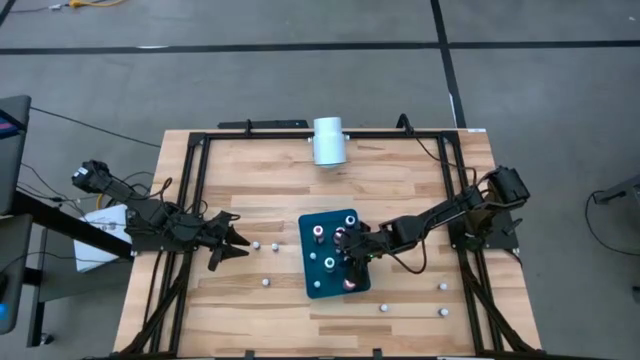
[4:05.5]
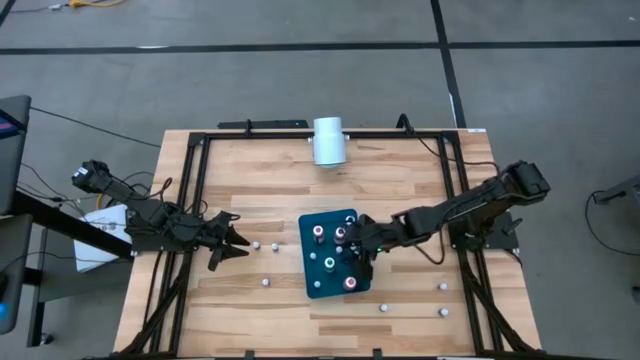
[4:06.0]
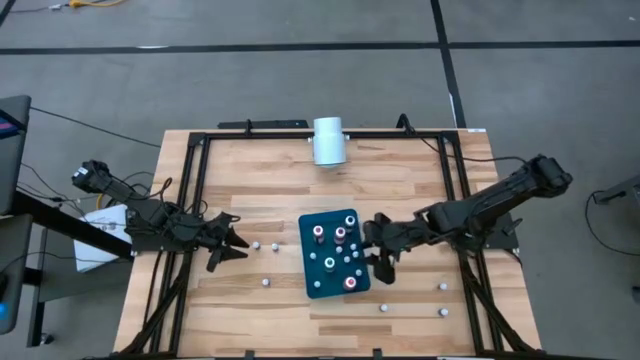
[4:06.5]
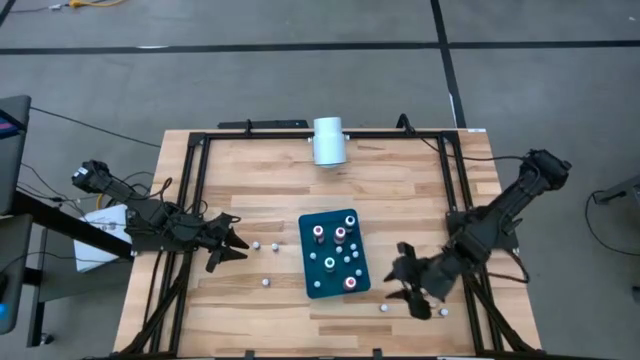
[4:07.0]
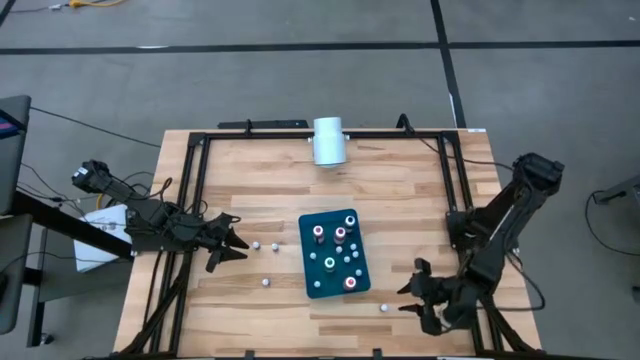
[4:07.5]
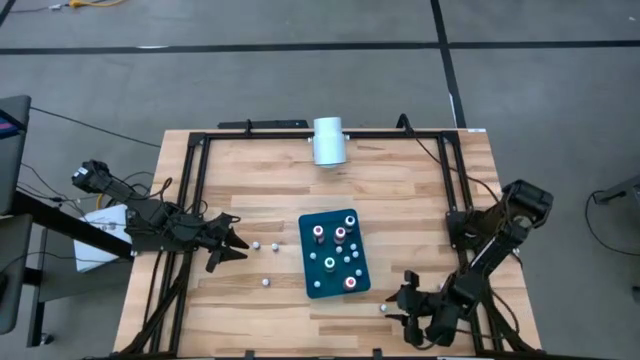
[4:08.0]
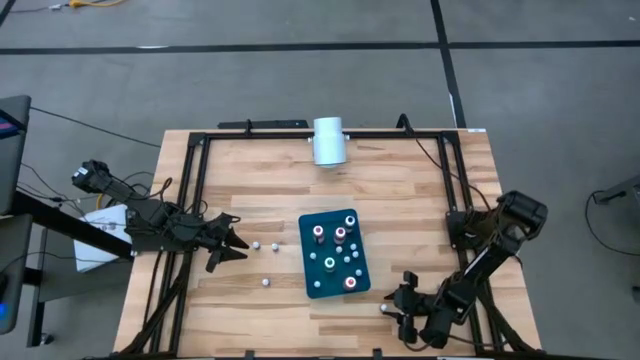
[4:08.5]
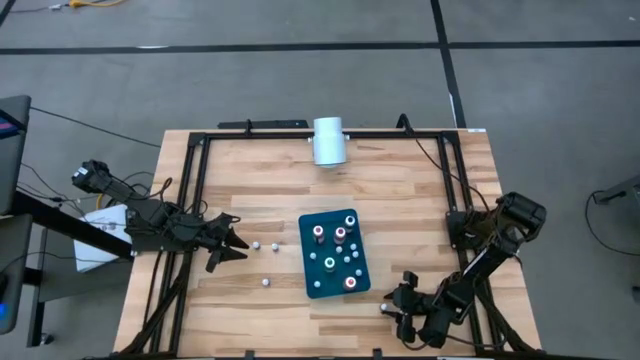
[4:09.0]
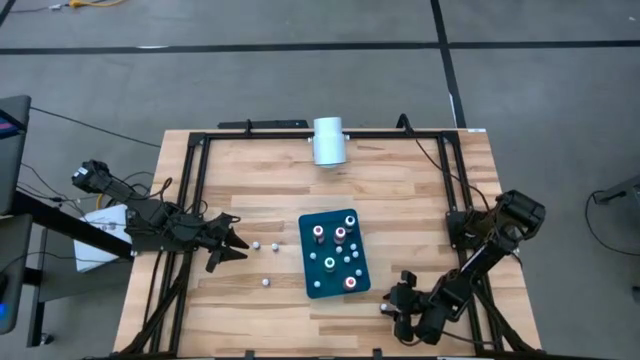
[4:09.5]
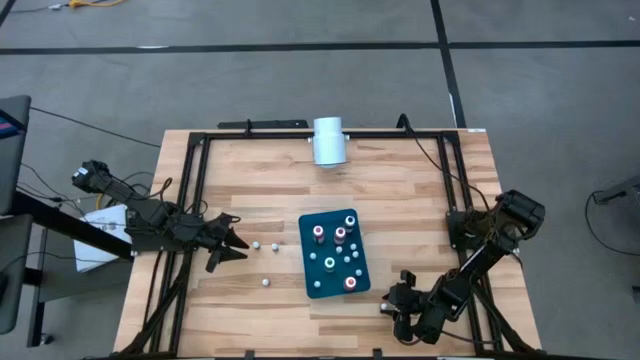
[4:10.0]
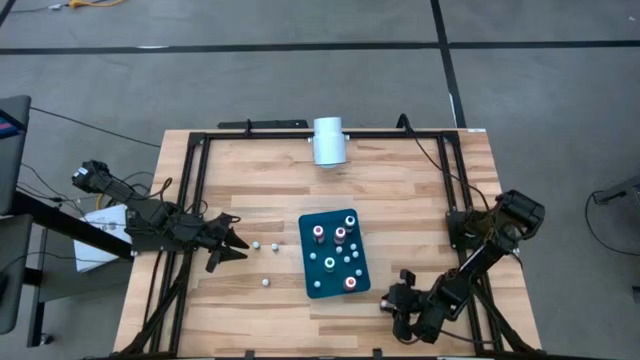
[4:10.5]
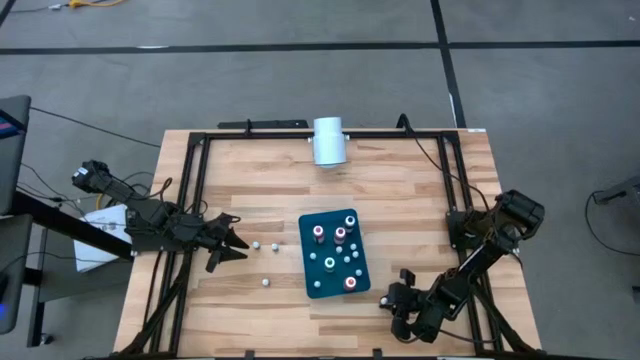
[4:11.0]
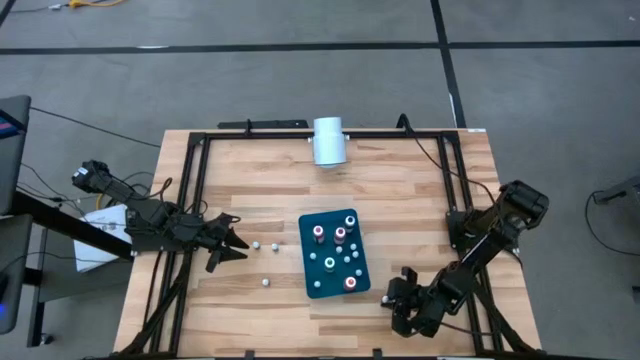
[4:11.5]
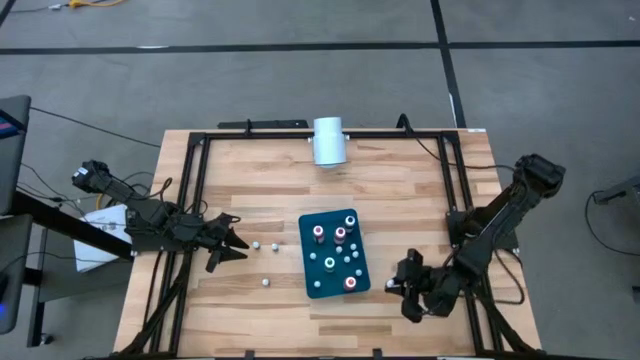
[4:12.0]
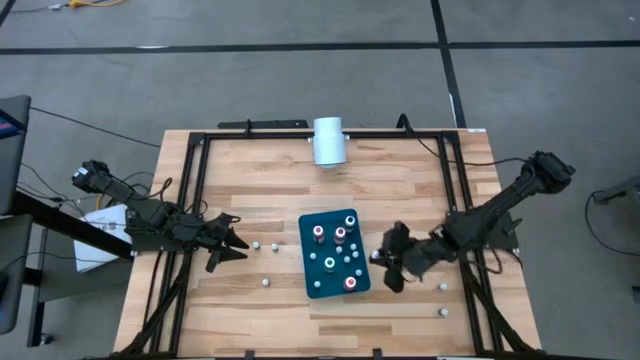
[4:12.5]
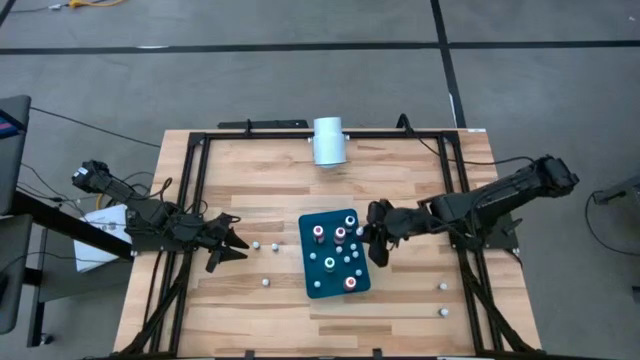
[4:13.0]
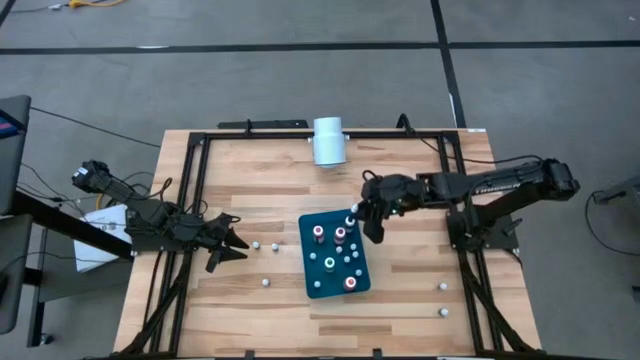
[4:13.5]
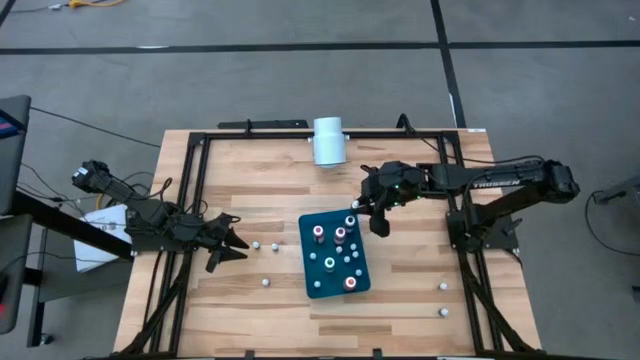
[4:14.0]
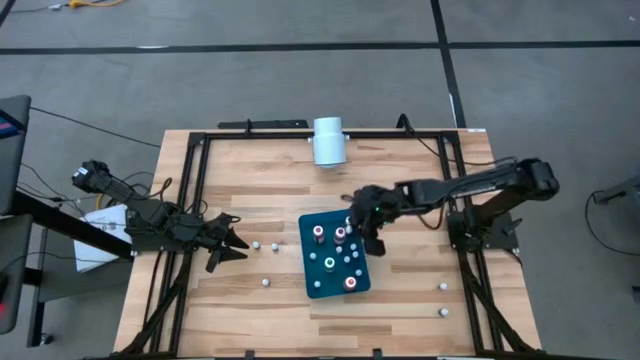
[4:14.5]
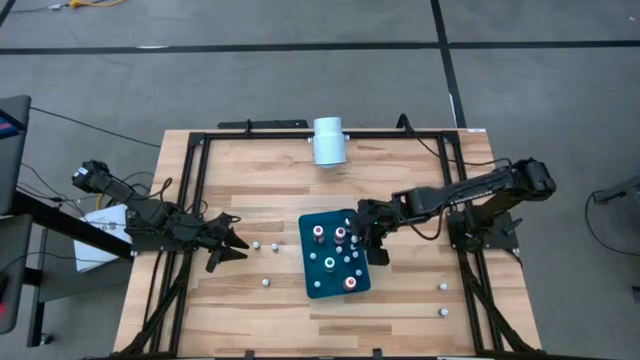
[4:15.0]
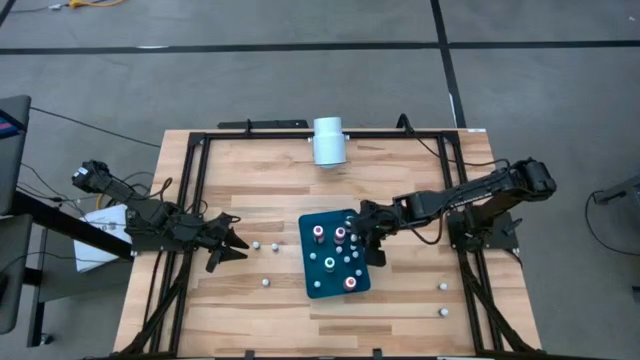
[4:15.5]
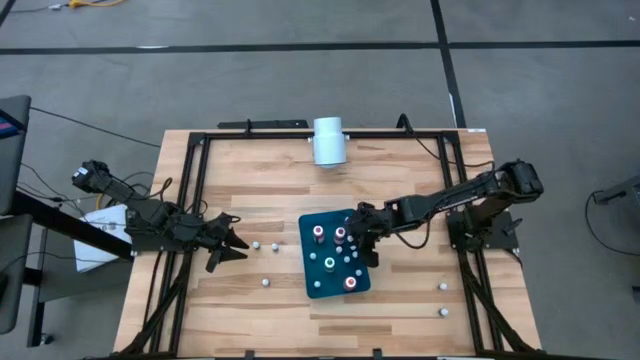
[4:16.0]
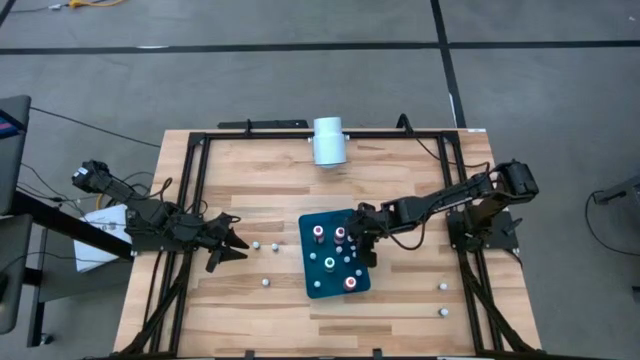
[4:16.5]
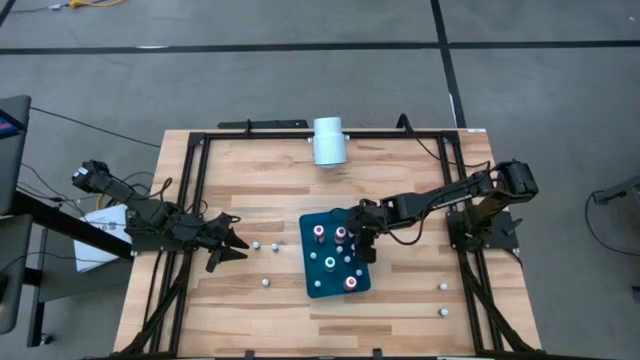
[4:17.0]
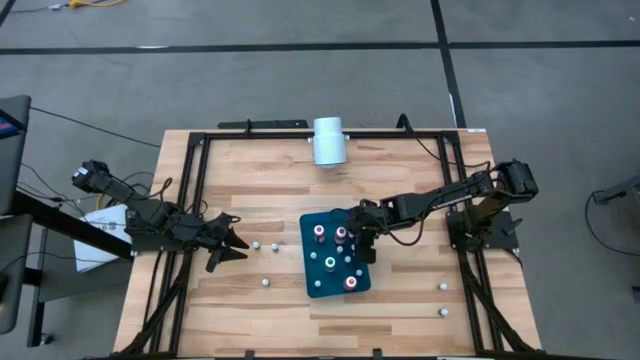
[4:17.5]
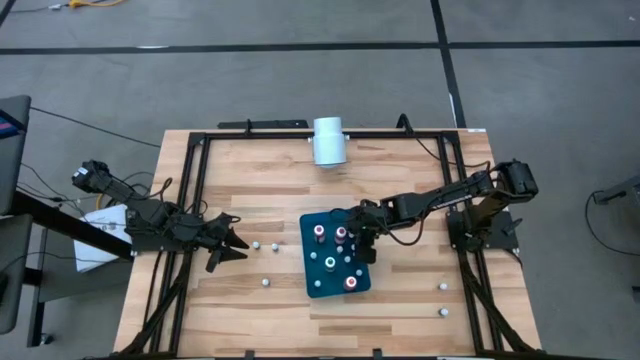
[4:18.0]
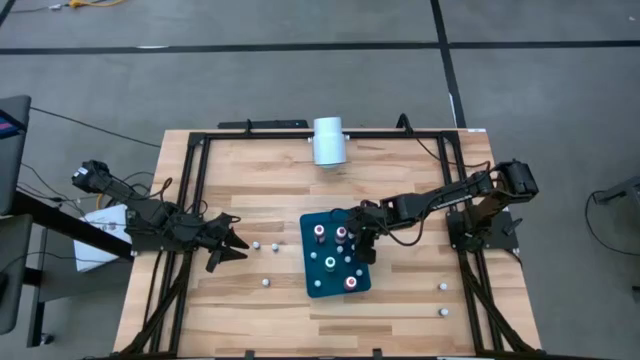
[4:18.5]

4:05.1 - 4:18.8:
Task: Pick & Place food coloring
Put the small blue food coloring bottle into the blue bin

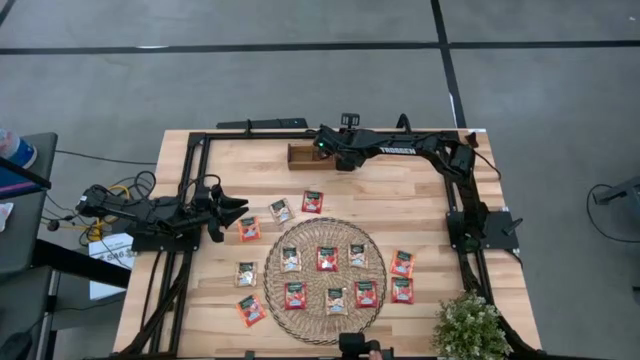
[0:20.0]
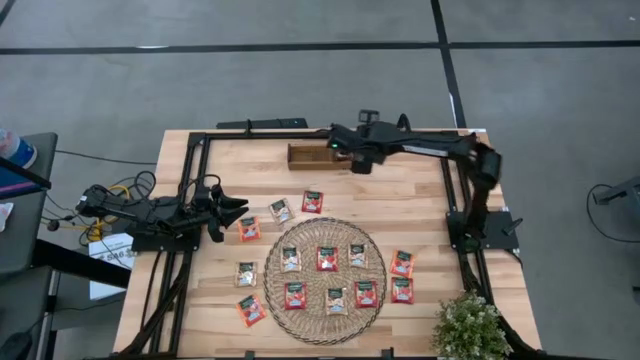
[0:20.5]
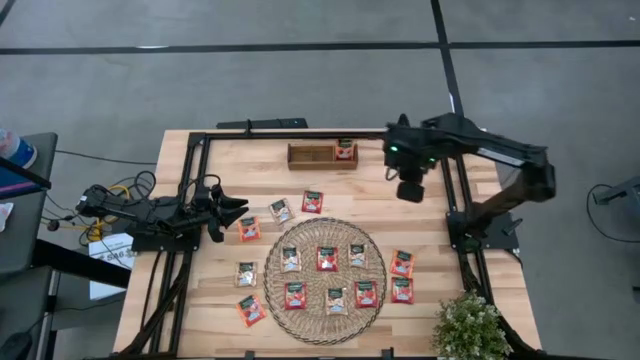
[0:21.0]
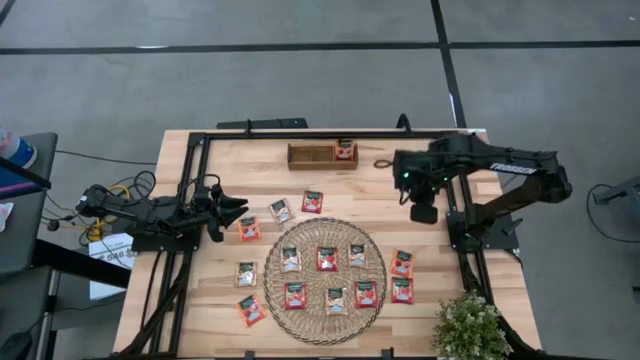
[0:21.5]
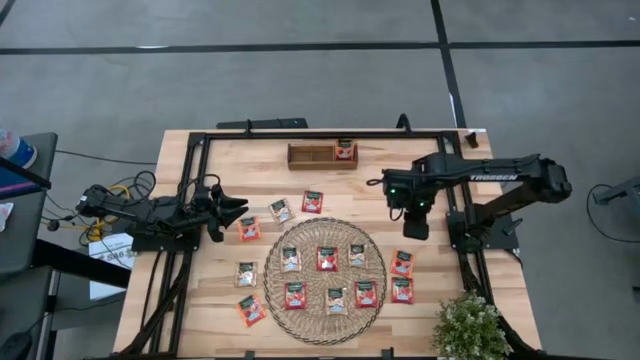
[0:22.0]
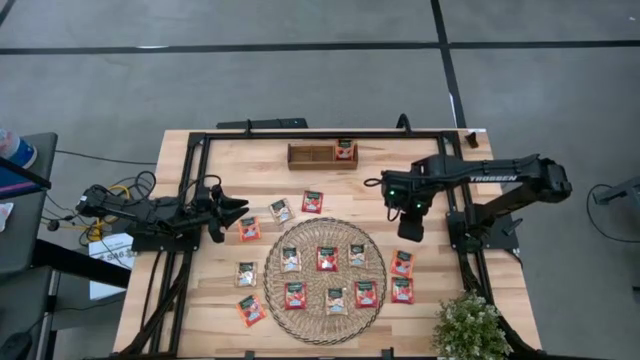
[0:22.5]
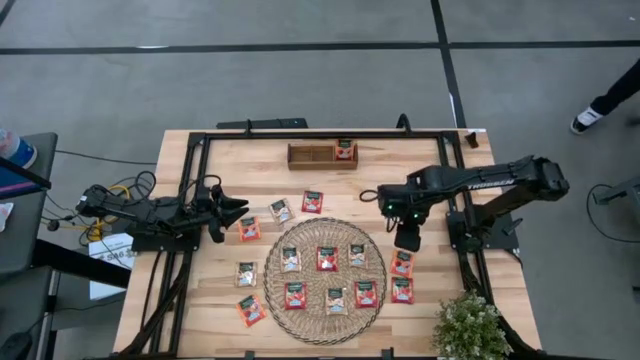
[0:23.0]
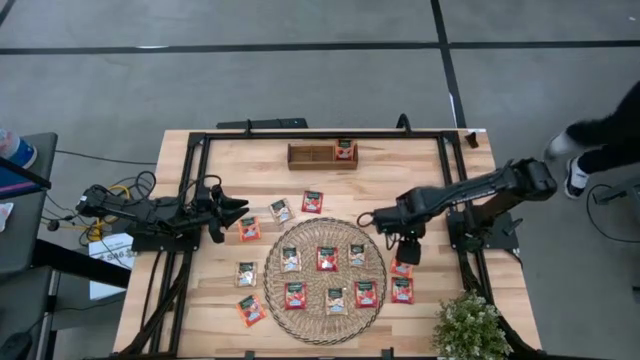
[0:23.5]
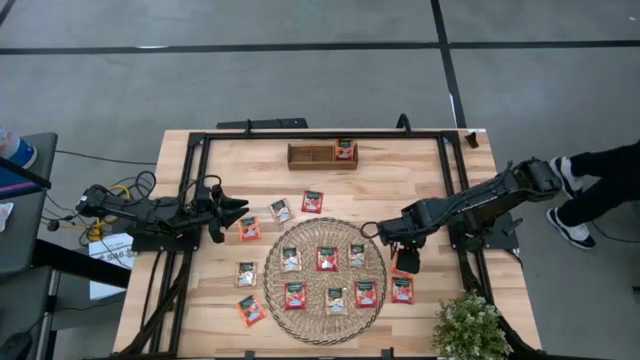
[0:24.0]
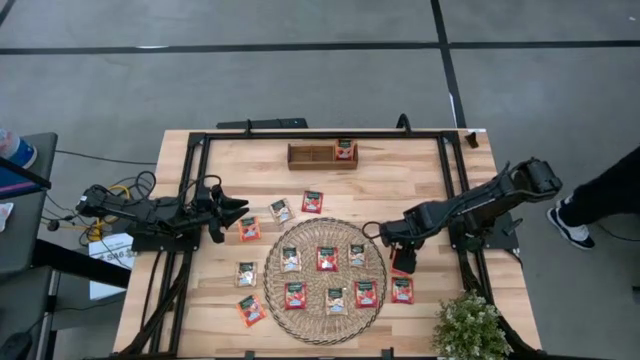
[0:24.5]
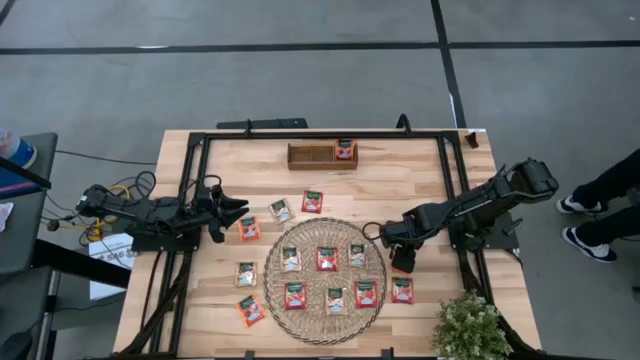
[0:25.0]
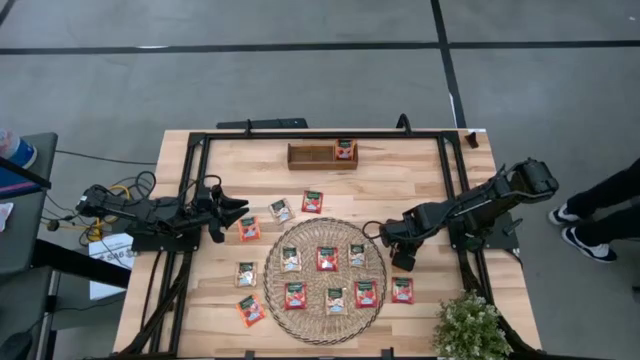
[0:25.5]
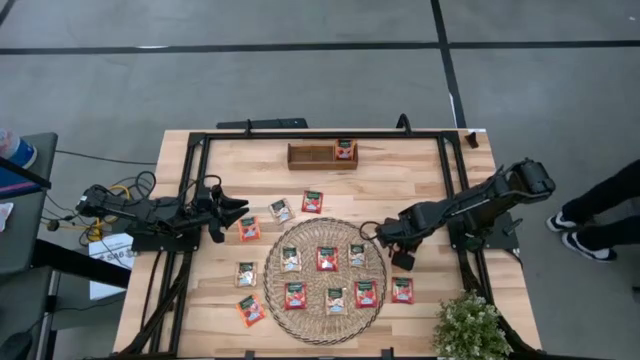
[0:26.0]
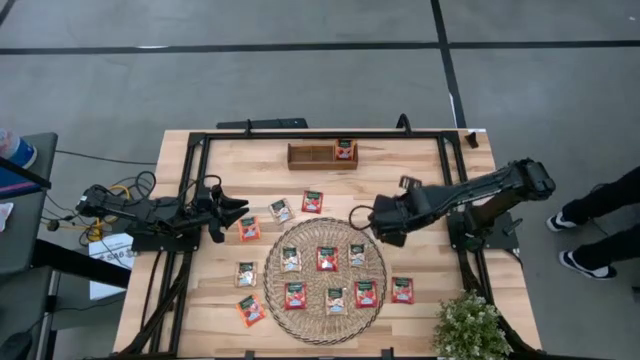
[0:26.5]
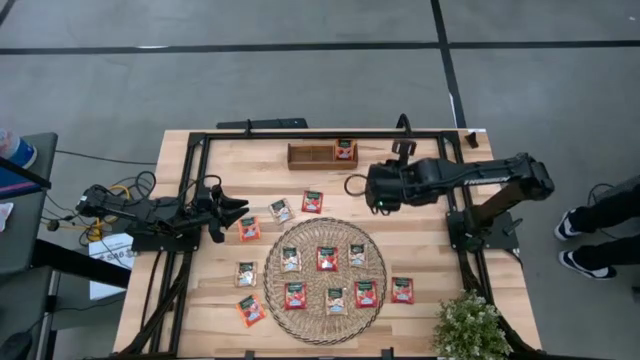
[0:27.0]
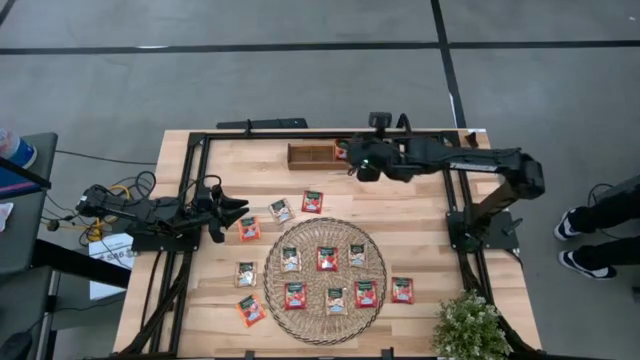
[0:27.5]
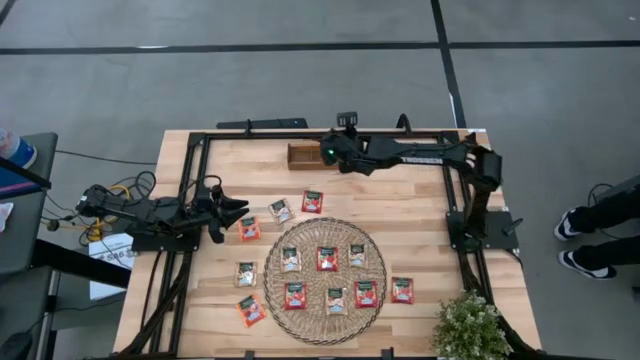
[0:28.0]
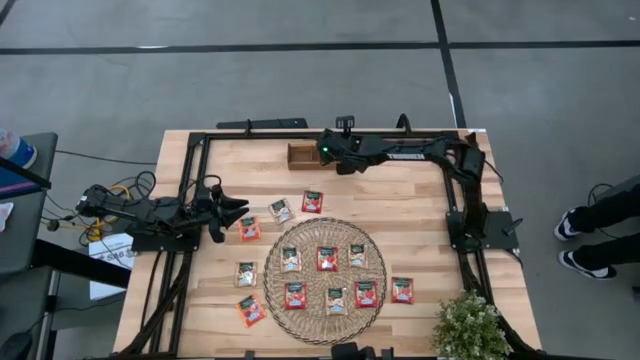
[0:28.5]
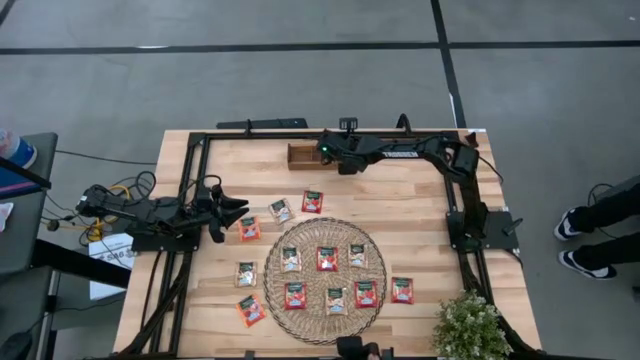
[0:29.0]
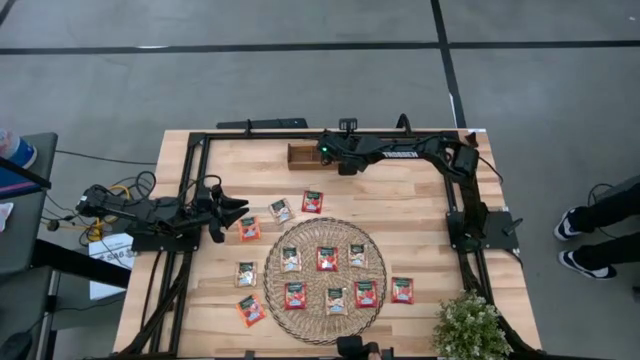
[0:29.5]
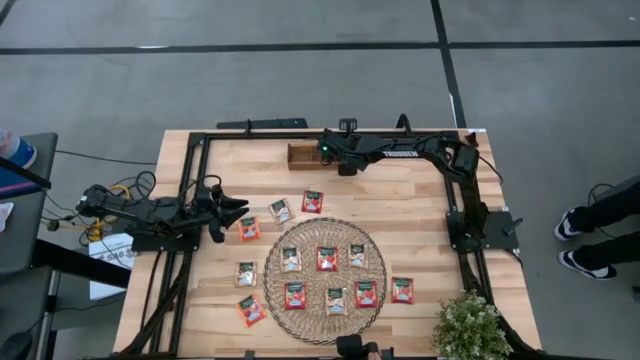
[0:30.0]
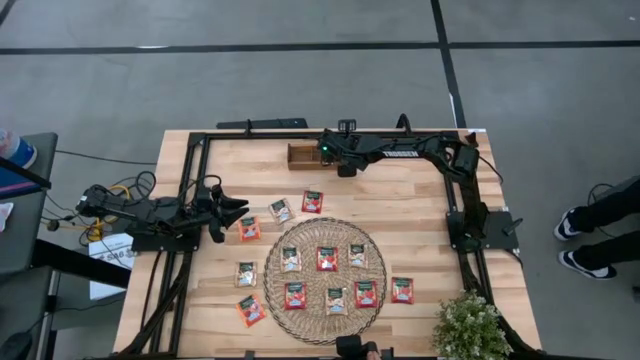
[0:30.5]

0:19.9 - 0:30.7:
Task: Pick & Place Tea
Put the orange tea bag into the right section of the wooden organizer
